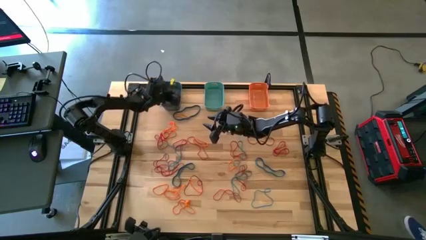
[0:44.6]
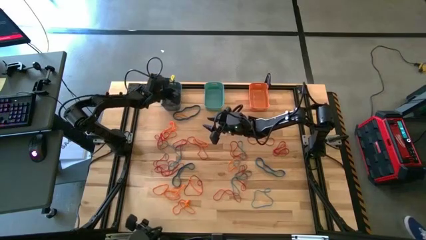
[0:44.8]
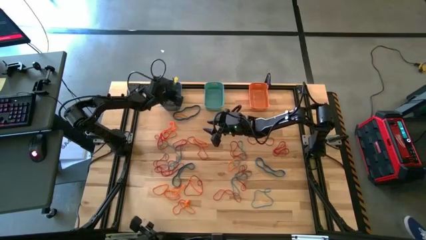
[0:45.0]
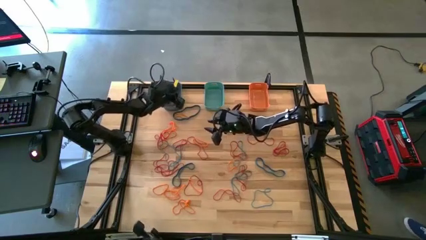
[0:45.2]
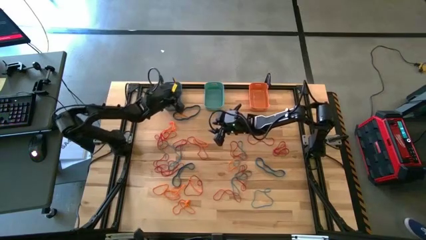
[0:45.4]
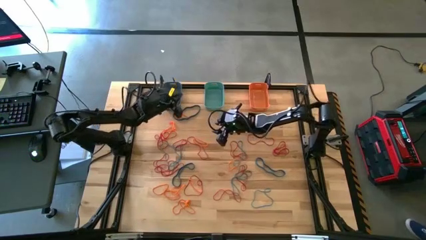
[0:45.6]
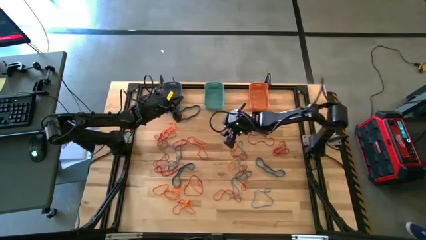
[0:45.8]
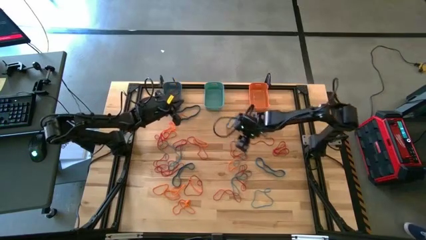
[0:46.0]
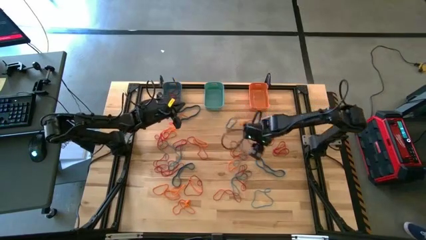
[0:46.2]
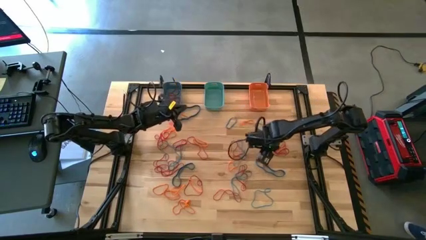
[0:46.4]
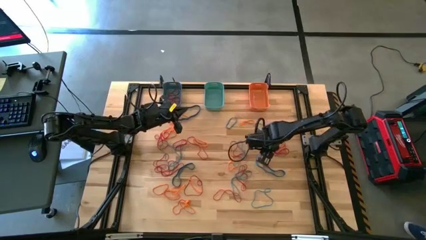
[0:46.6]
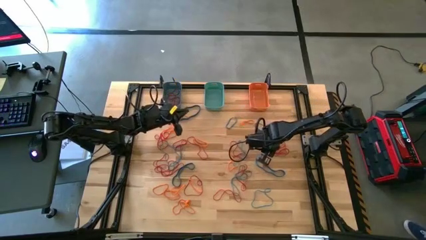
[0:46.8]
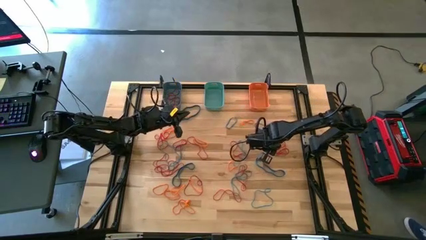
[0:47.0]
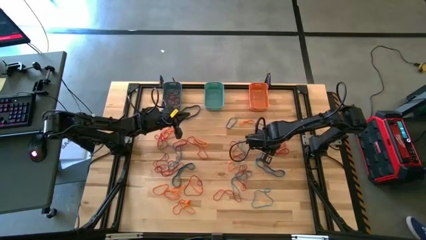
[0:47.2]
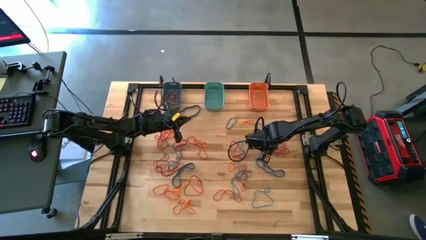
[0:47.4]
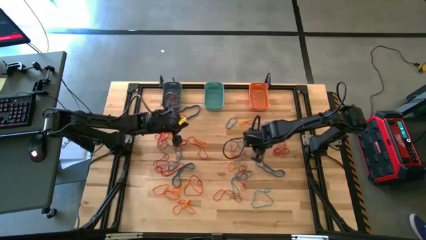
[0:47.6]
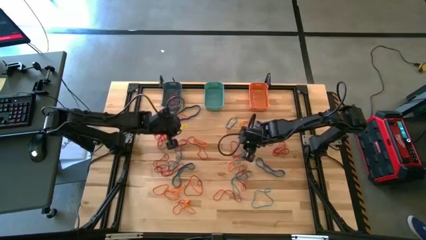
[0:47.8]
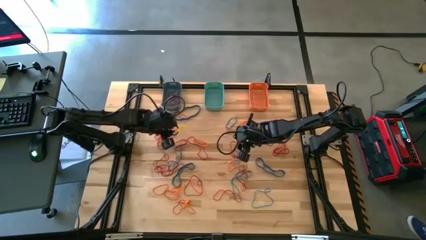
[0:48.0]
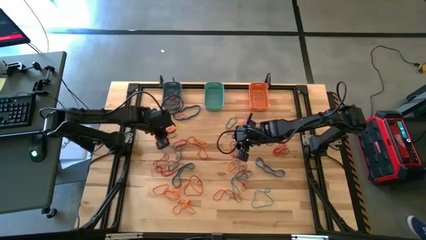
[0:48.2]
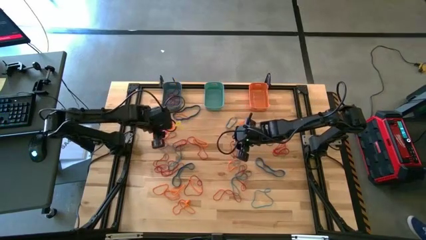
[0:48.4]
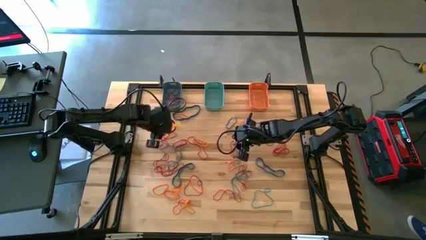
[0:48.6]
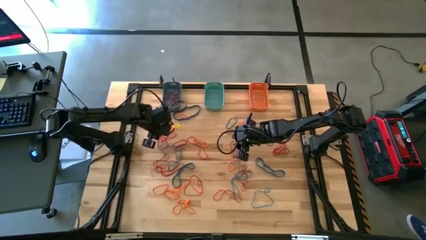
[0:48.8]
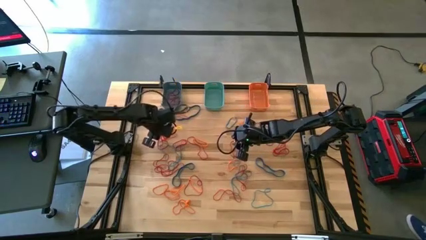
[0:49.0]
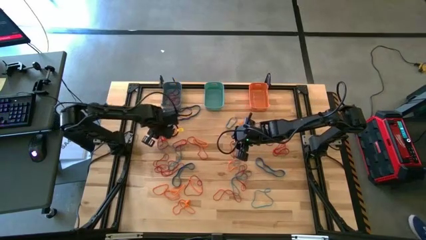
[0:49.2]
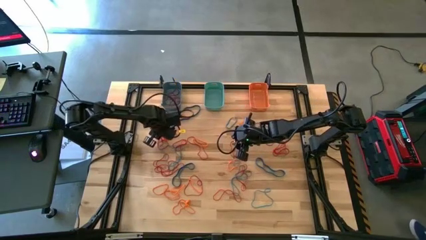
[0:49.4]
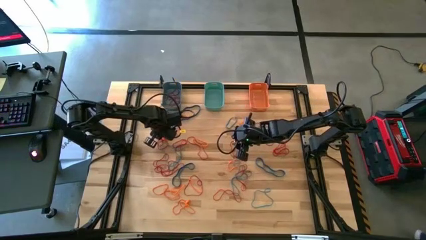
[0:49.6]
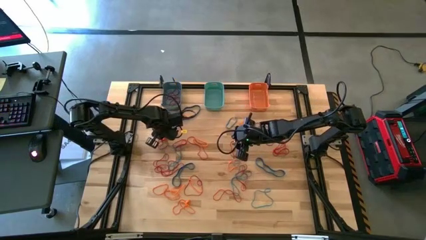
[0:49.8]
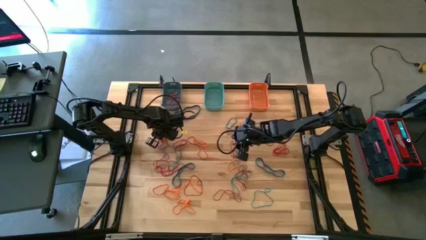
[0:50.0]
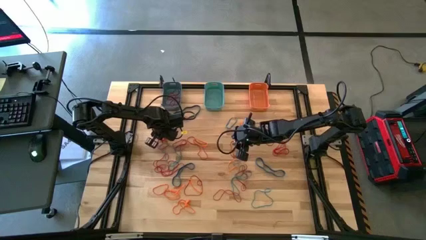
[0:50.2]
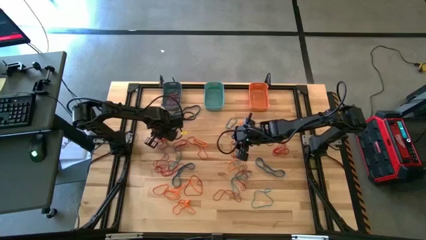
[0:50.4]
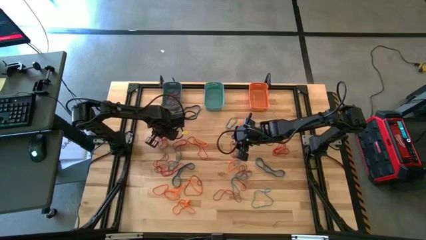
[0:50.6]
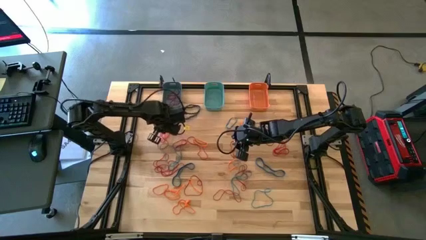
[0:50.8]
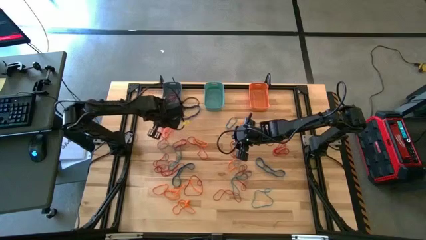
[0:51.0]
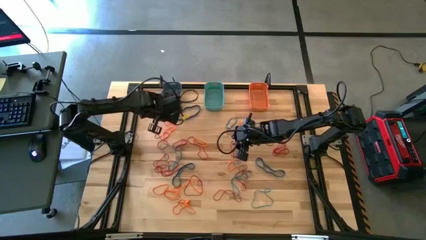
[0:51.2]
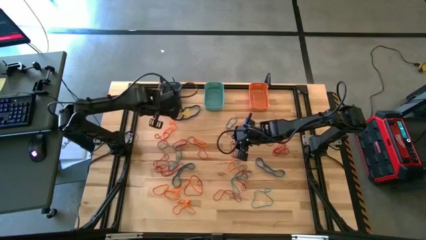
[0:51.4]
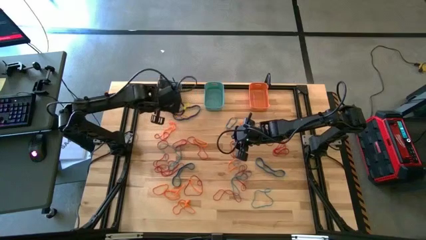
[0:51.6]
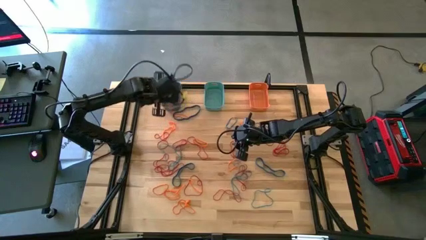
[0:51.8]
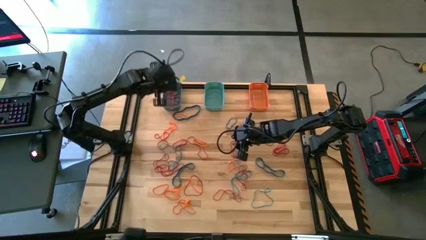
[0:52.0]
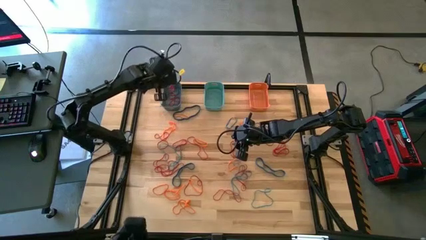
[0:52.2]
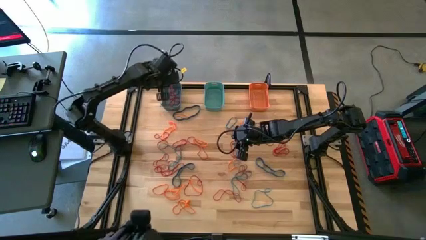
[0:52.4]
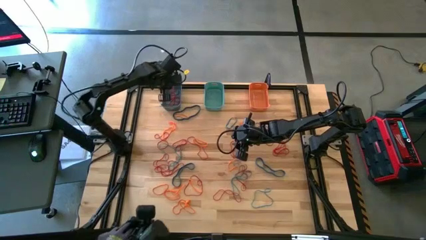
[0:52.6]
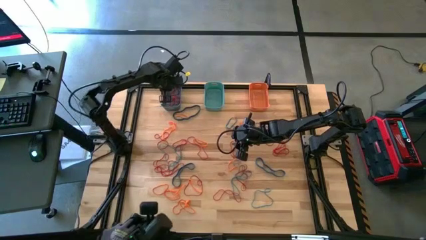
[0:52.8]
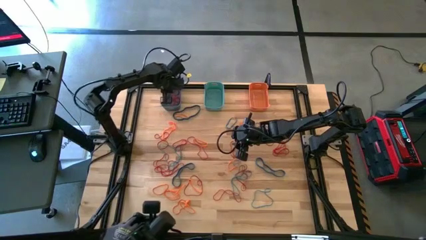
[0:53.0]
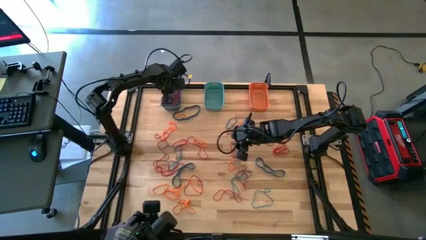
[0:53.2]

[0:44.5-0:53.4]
Task: Sort rubber bands into baskets
Put the red rubber band into the blue bin

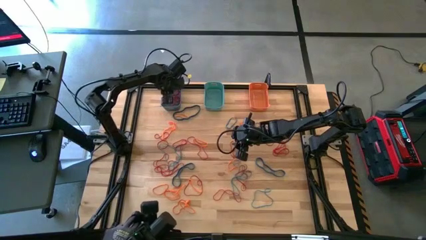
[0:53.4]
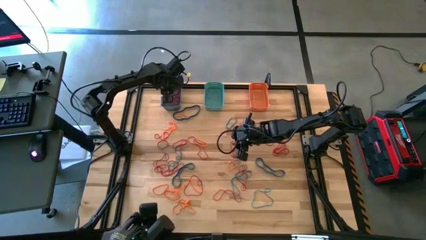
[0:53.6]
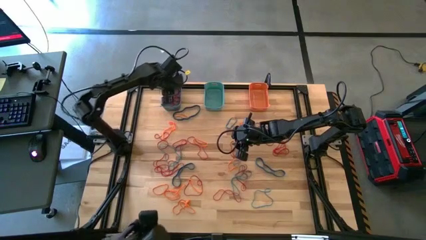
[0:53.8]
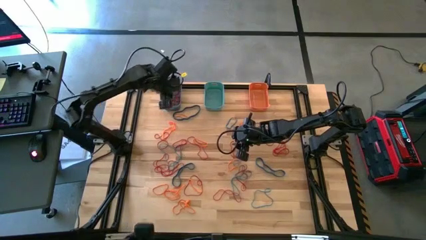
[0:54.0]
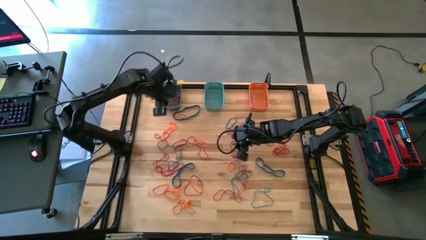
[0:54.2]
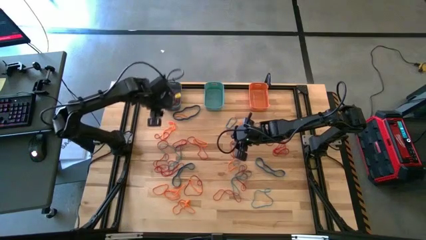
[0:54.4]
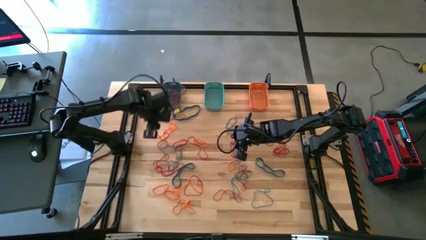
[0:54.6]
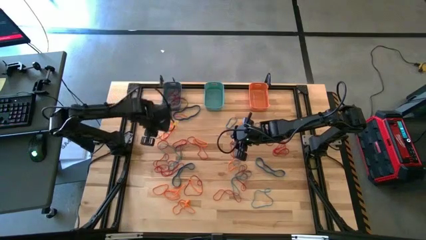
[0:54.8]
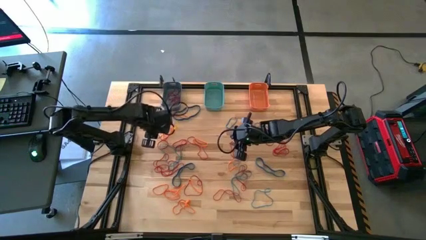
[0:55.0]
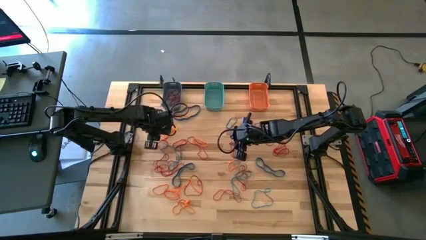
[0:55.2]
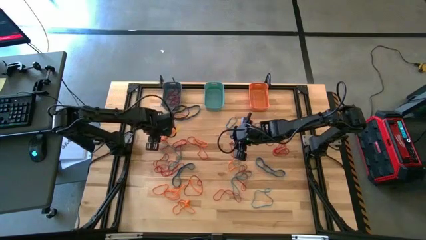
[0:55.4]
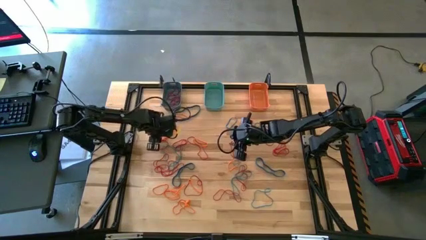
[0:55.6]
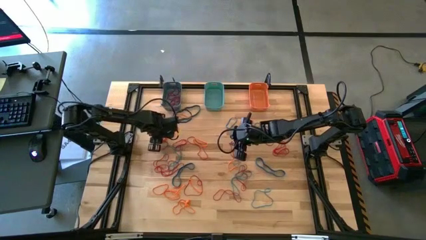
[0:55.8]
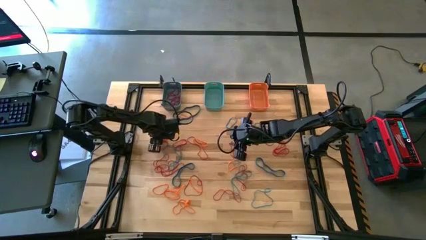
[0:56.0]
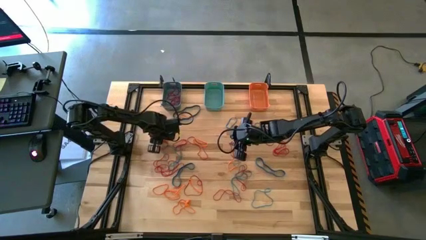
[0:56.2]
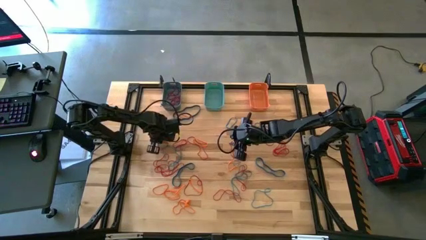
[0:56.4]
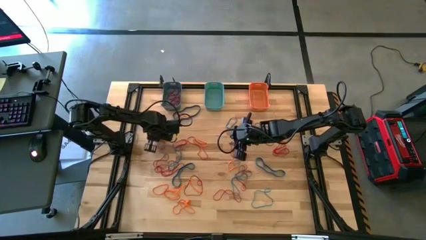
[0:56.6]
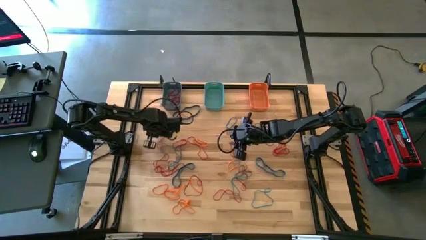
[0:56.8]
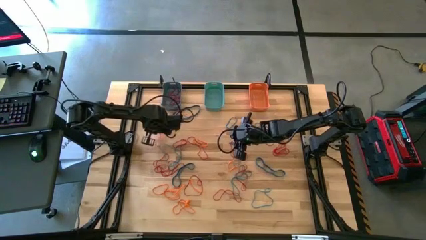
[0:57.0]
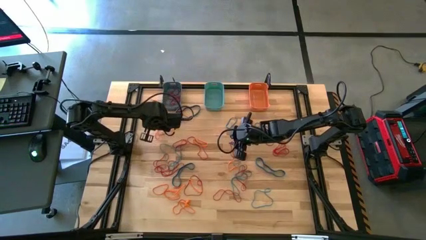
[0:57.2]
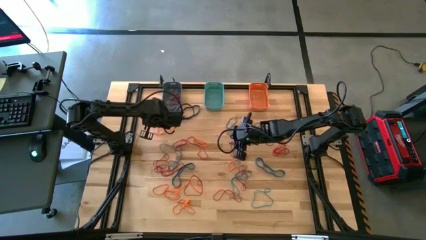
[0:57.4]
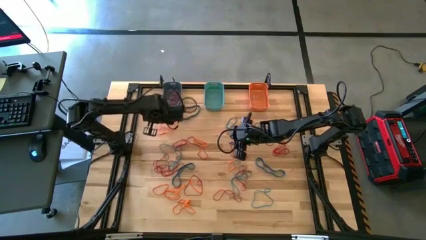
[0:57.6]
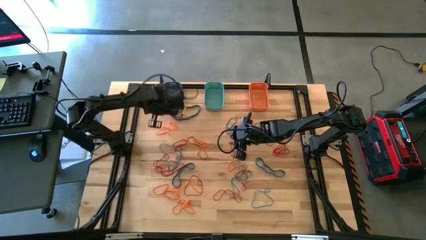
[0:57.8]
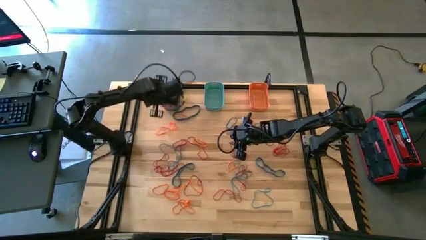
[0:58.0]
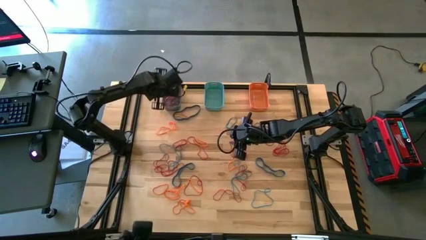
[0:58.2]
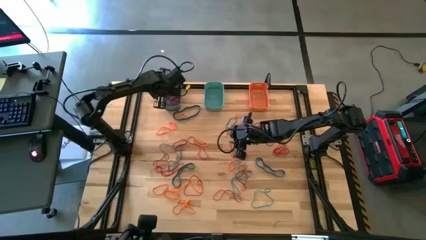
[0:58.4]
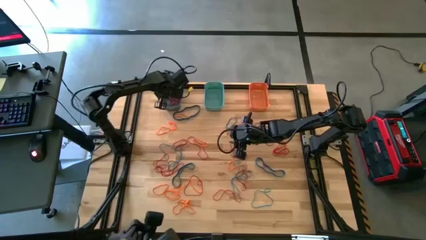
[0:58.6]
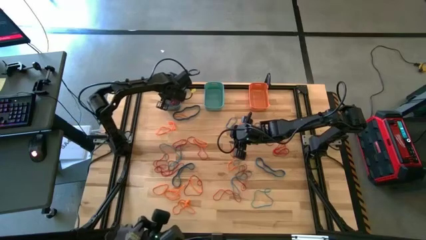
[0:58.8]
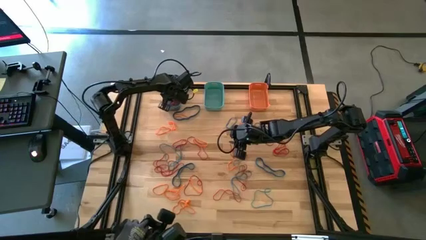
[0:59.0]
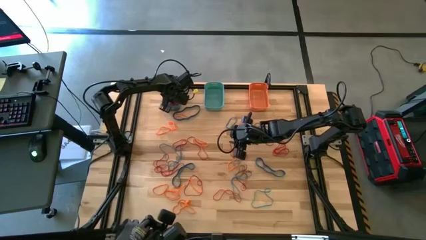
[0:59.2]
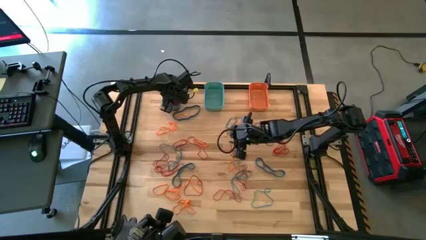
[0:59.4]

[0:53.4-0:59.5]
Put the red rubber band into the blue bin
